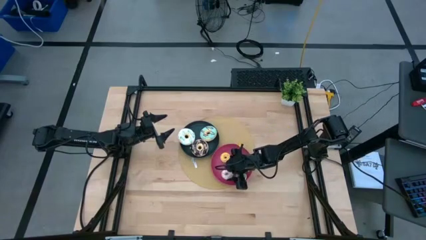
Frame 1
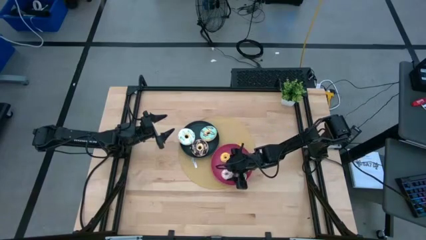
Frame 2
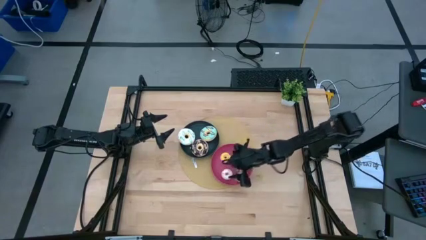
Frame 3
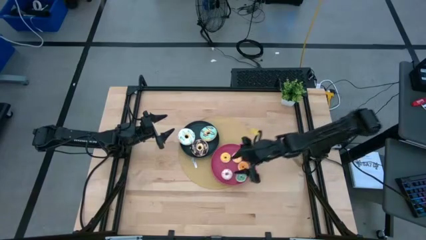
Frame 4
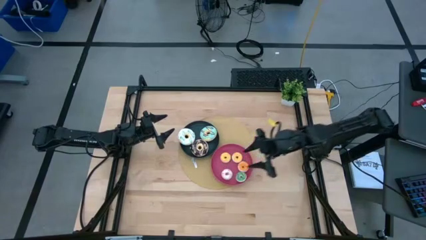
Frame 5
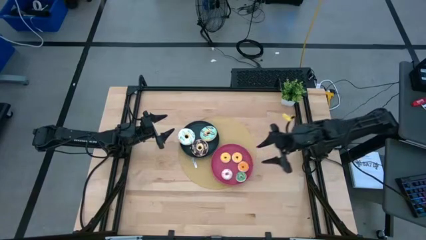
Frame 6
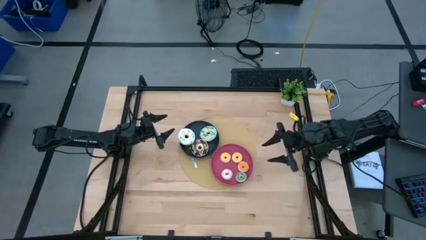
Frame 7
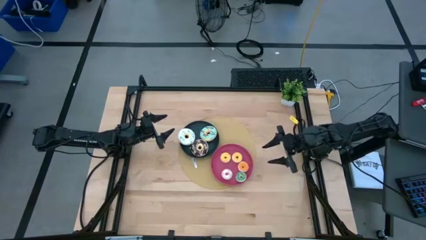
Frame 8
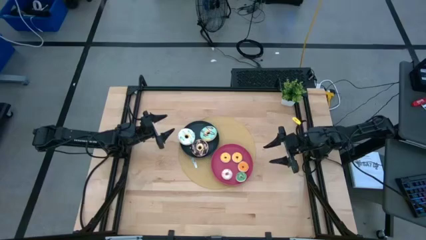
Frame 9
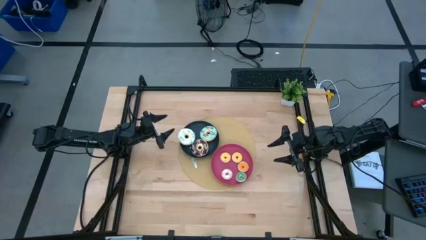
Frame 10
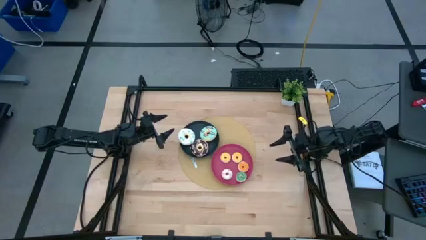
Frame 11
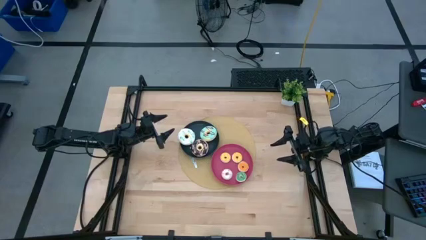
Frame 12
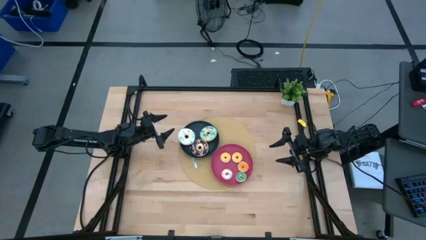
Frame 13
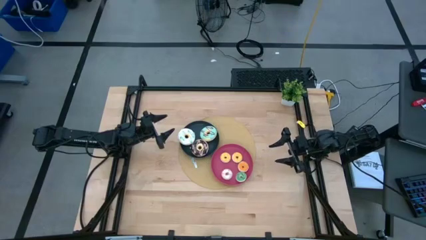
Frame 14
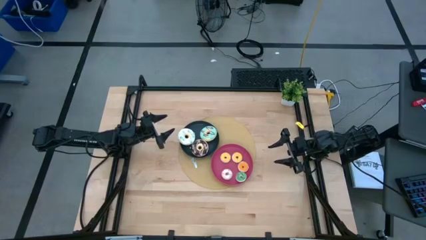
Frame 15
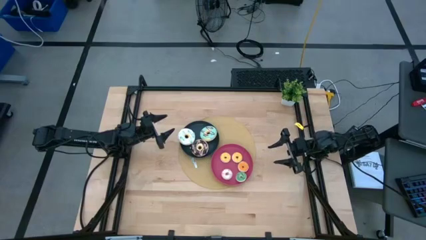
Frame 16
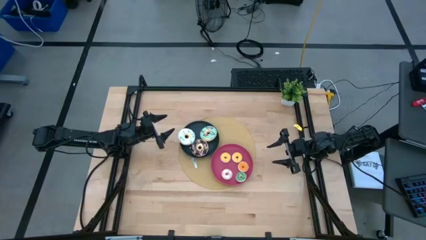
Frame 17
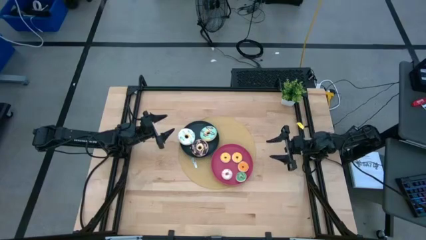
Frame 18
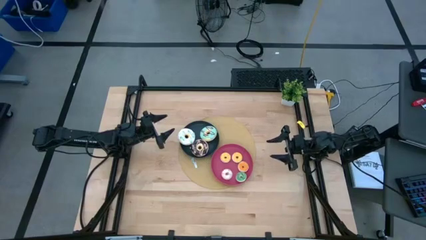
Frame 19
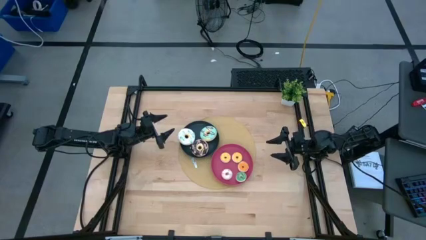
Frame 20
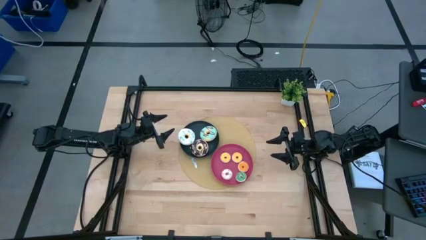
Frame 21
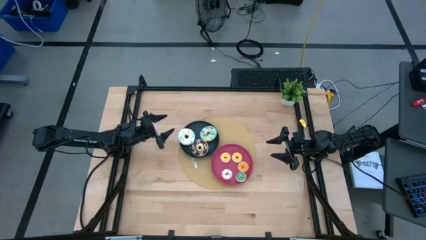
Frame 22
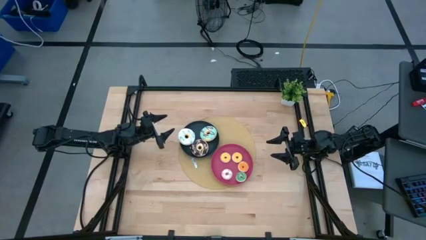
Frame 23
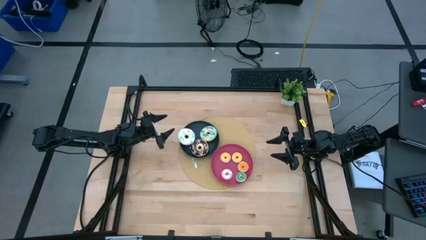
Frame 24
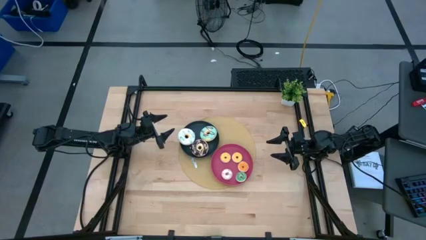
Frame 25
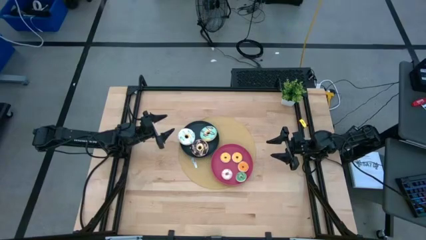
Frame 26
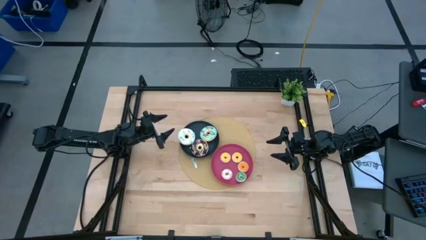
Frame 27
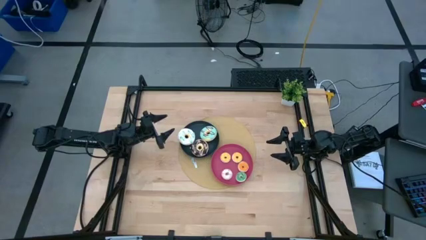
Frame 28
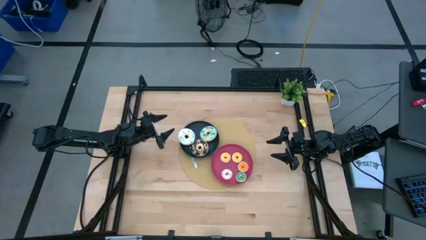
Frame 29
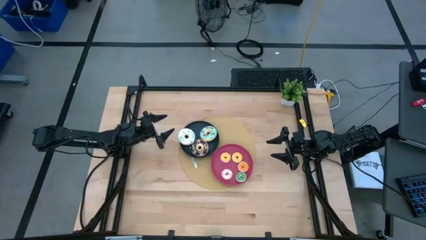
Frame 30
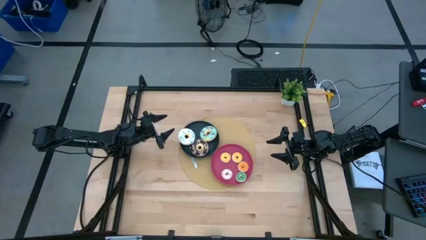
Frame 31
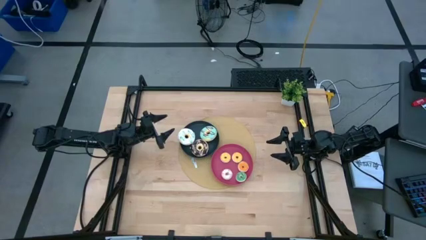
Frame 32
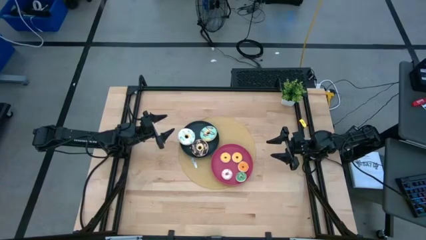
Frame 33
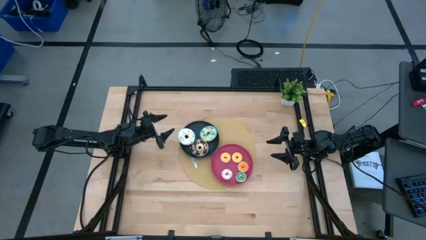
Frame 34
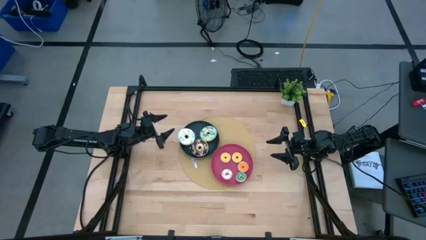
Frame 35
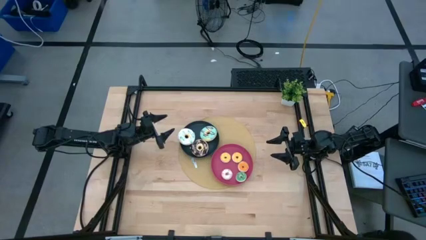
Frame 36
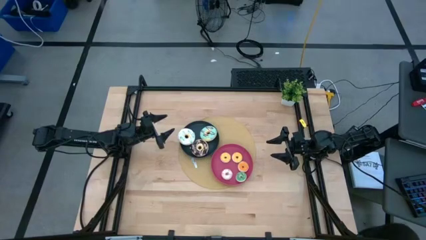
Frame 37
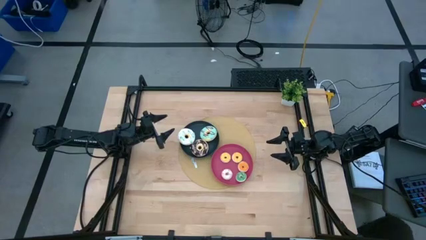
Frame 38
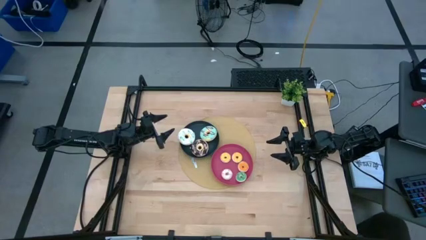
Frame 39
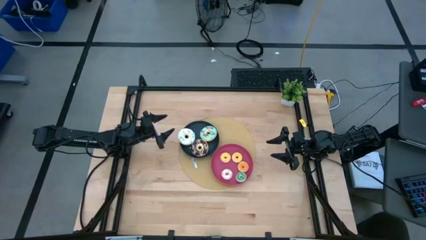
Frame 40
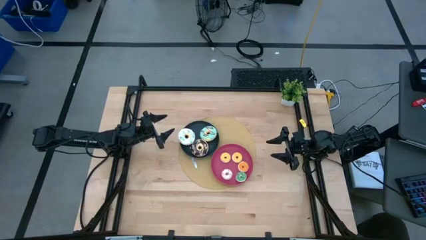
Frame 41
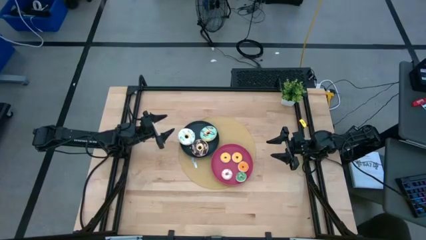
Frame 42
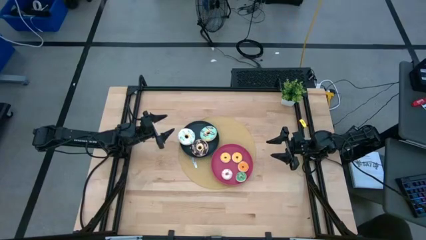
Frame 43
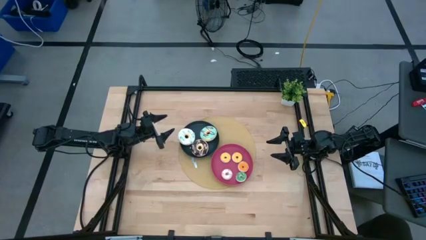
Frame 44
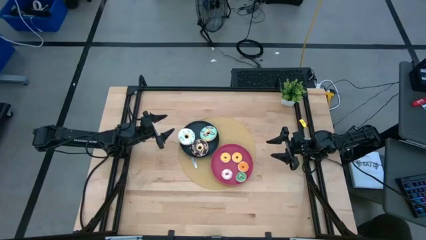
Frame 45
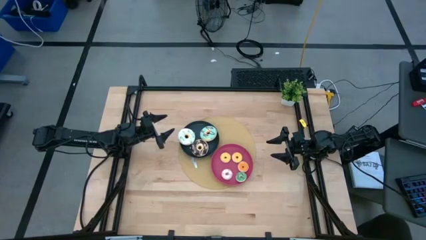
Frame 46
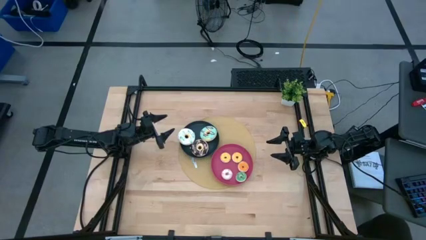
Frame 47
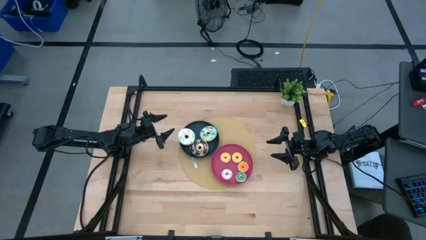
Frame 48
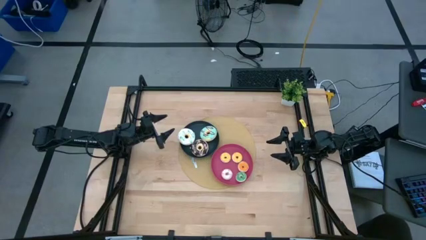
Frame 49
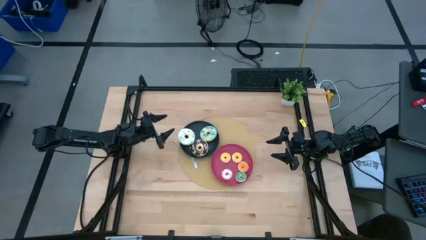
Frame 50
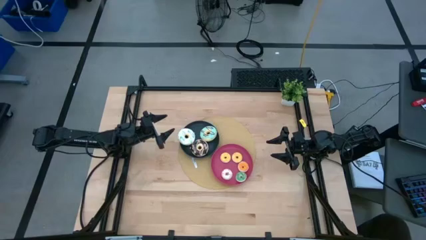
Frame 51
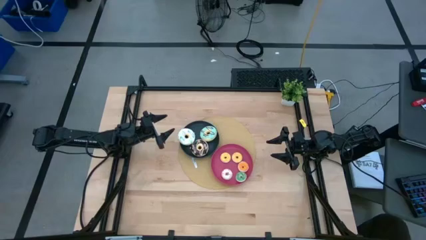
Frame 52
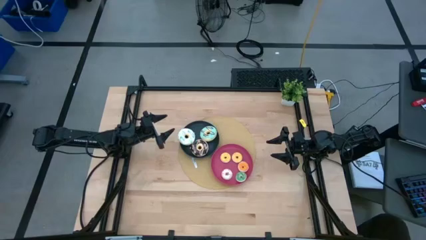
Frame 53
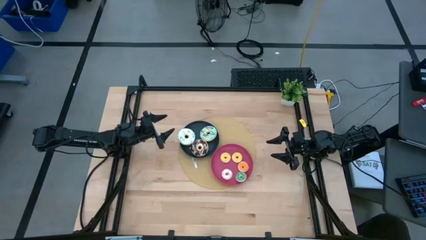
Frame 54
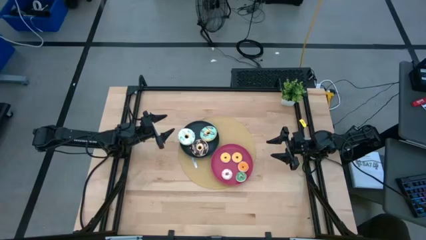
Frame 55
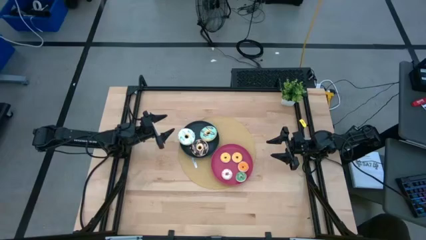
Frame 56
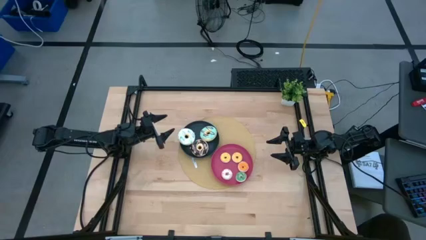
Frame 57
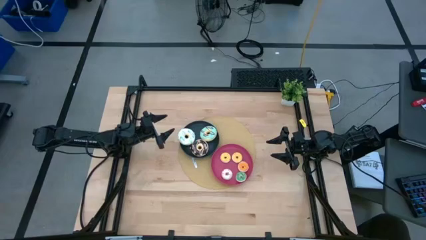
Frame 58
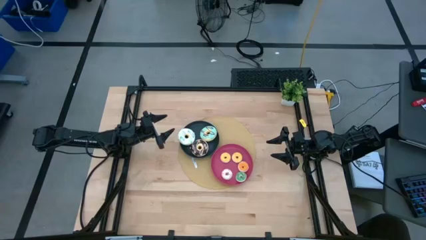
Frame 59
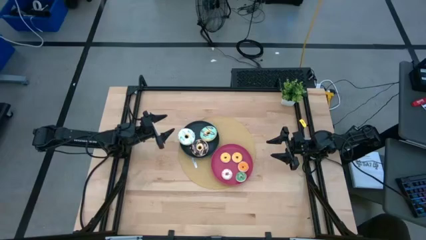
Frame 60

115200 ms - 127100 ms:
Task: Pick & Place donuts
Return to Home Position

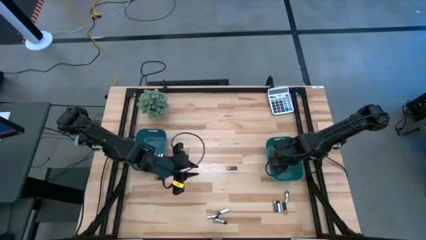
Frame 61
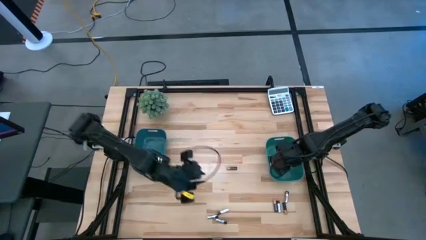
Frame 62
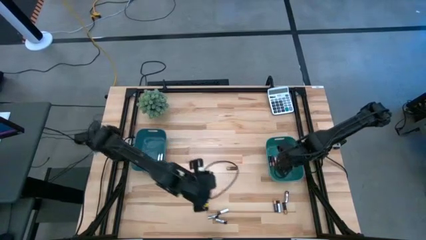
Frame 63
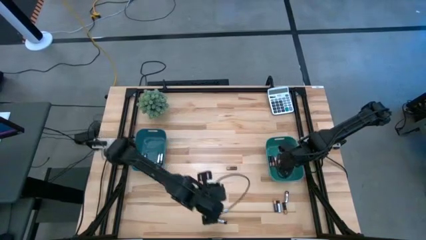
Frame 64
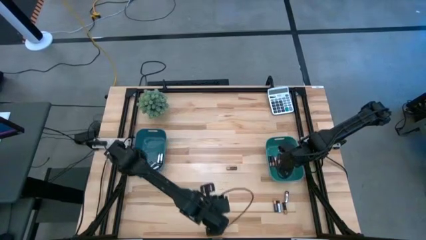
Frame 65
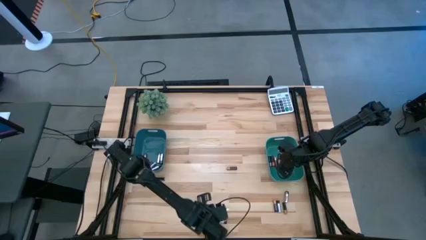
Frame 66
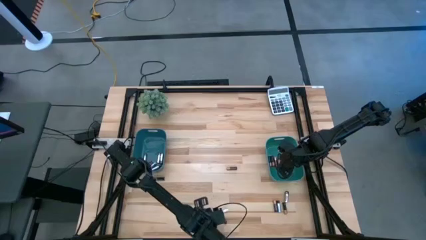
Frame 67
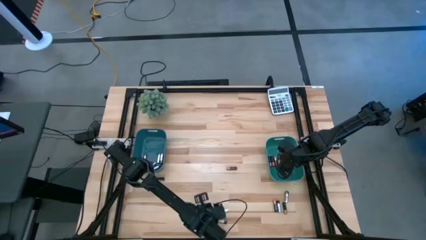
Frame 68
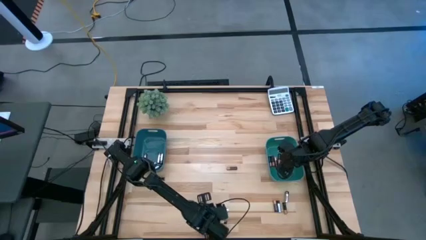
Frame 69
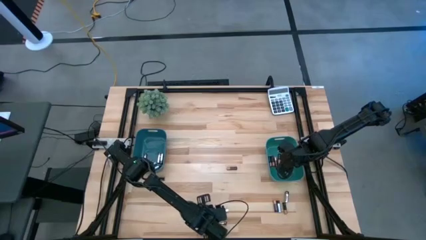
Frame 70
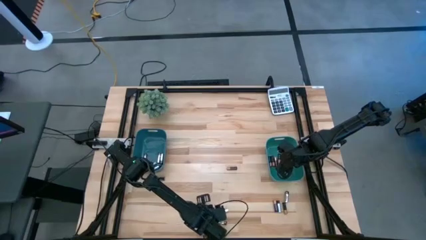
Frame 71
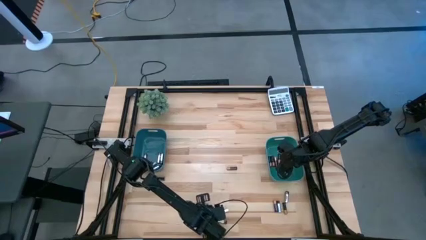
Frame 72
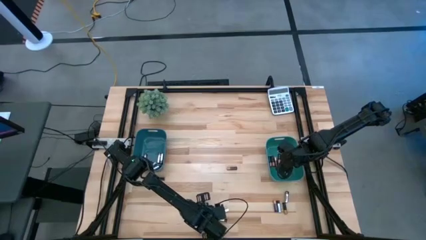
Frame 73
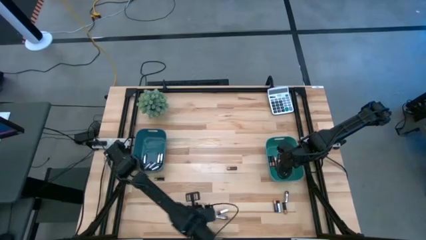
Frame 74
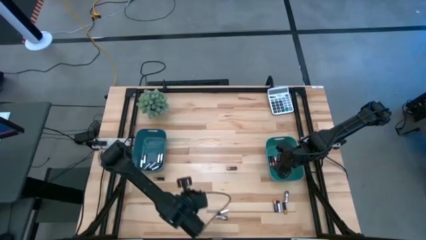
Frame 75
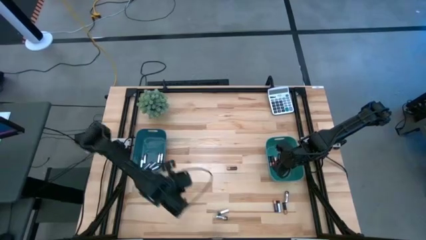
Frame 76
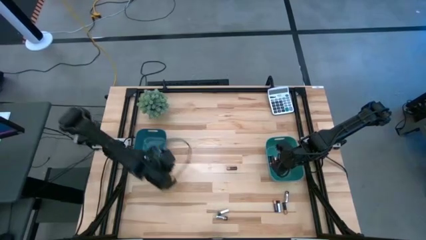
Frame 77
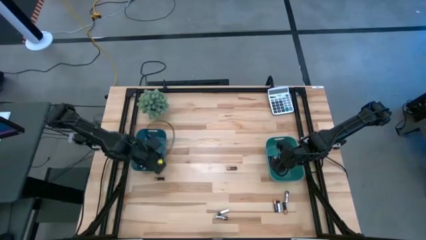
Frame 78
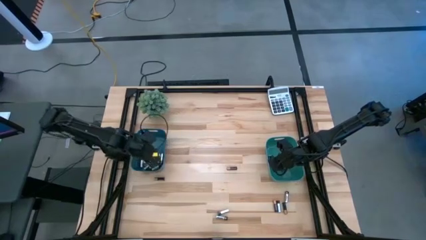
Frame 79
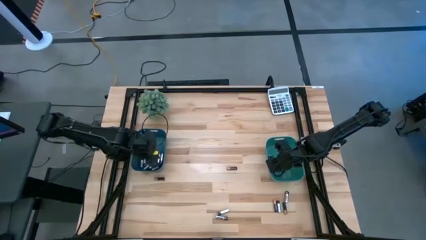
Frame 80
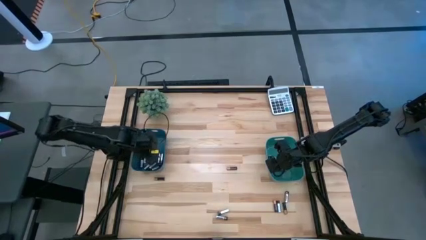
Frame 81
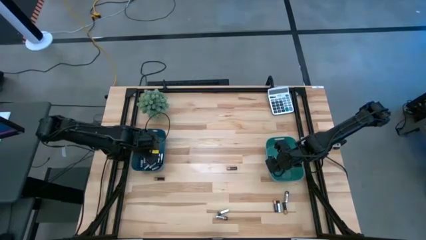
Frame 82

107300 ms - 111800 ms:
Task: Sort batteries
Put the silver battery into the blue bin
